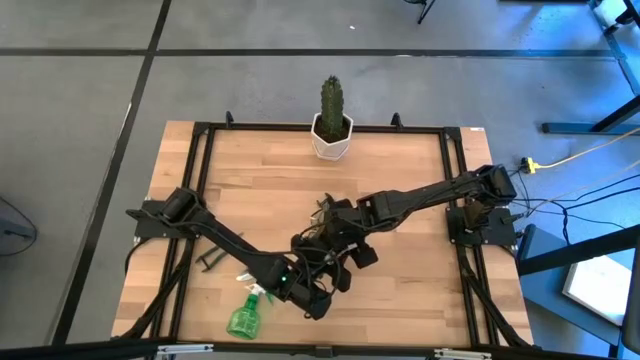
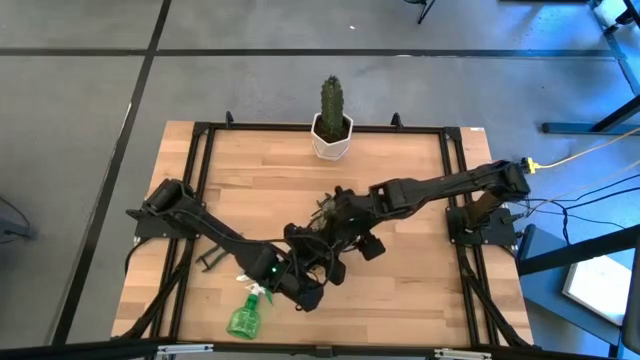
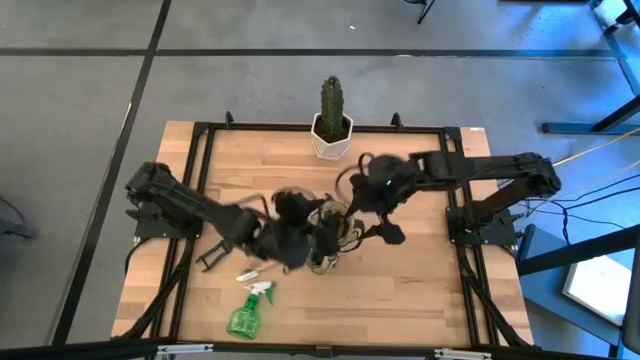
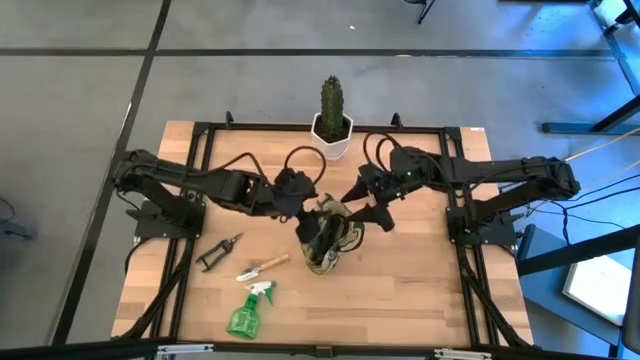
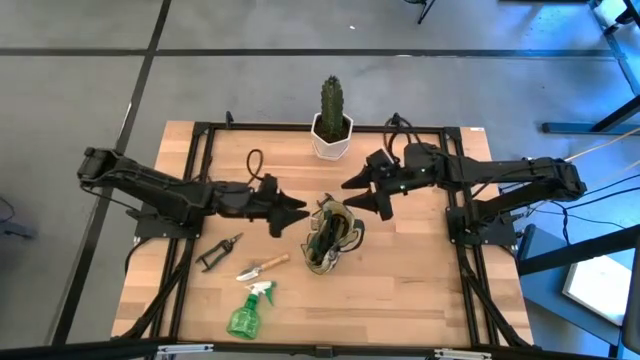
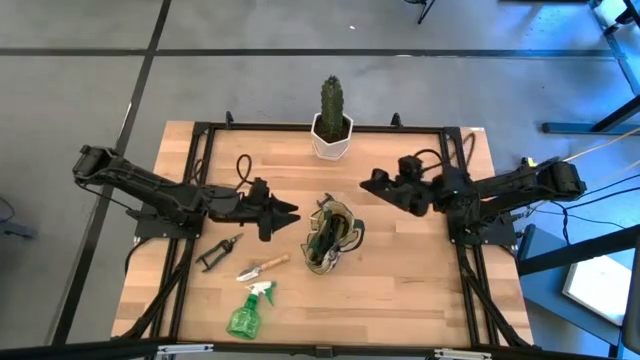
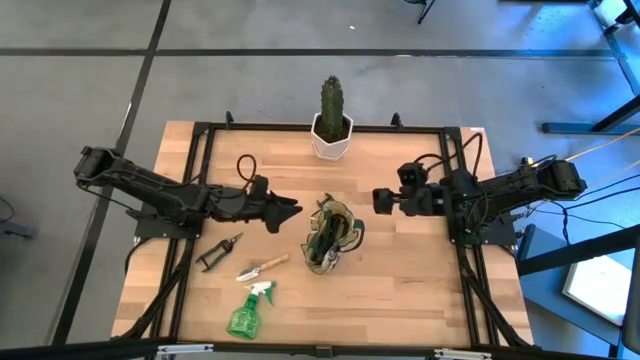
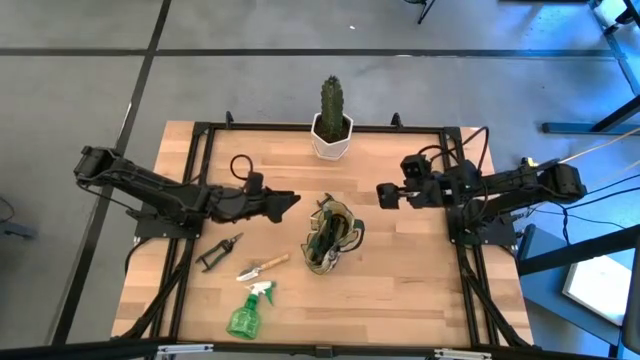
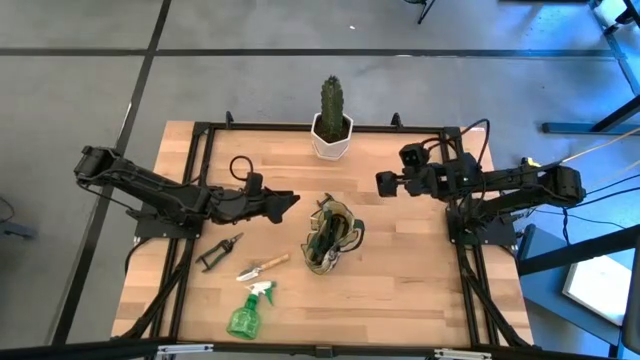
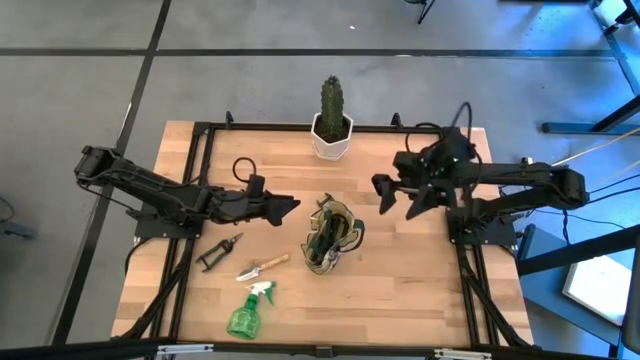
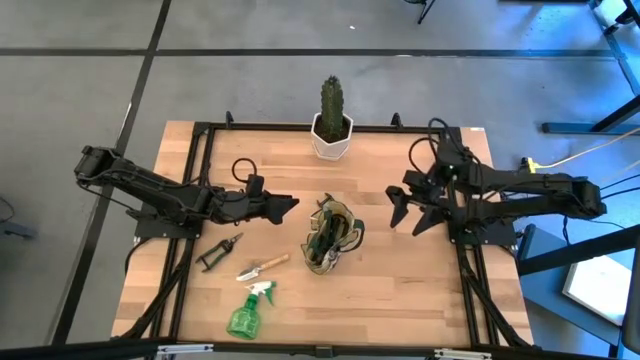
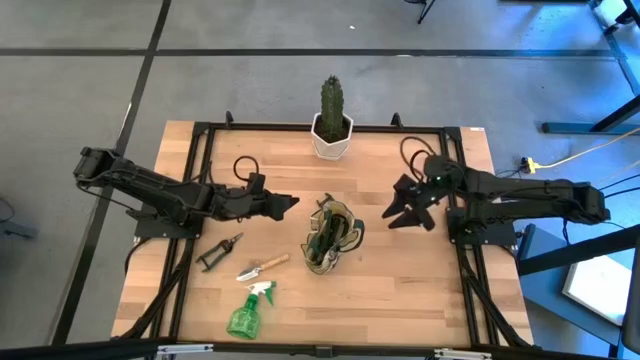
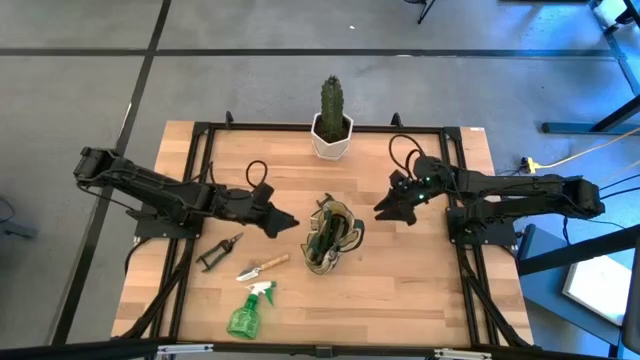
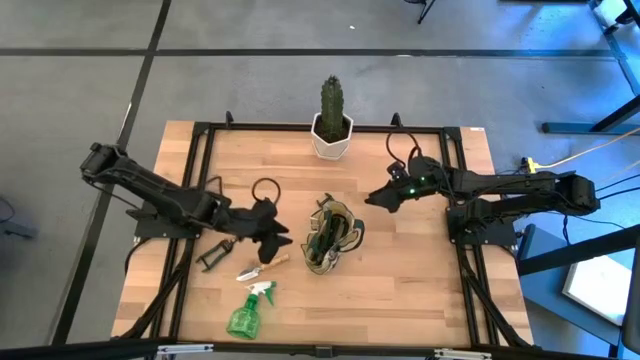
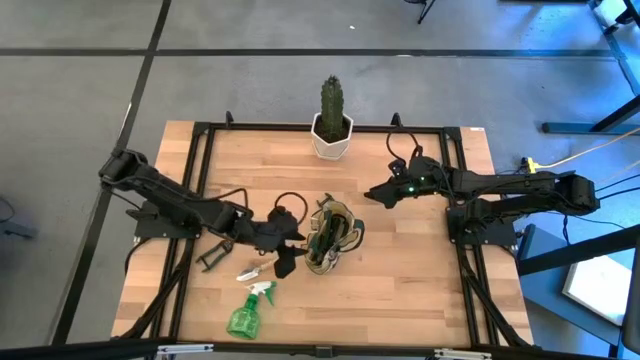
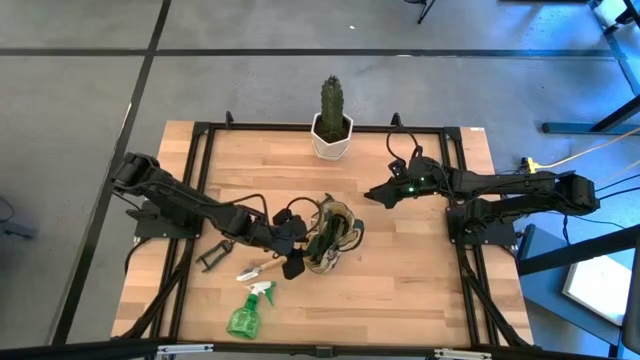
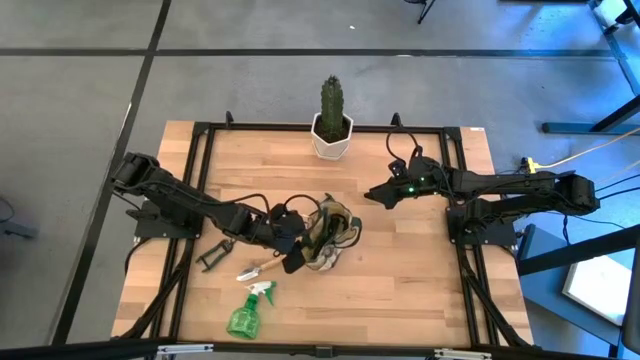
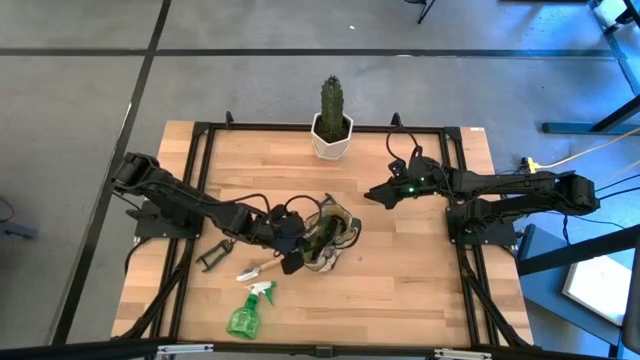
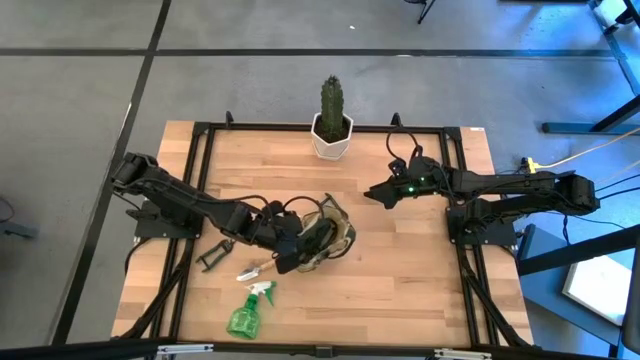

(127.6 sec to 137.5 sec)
Task: Pick & Place Garden tools in Gardening bag
Adjust the green gardening bag

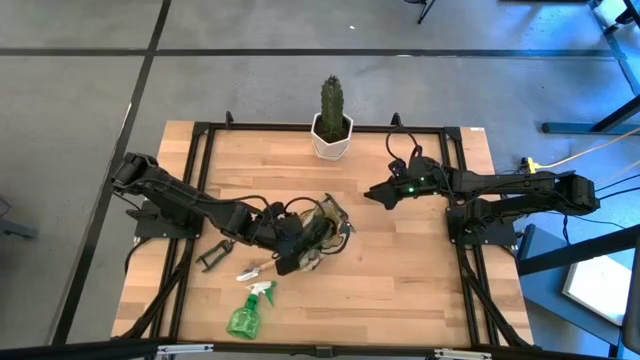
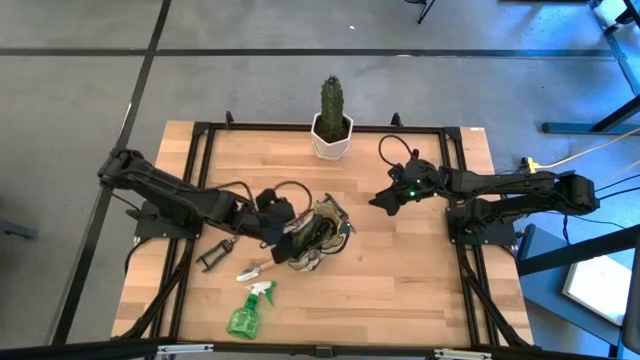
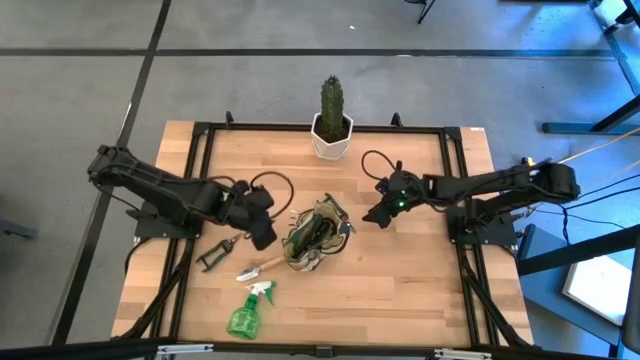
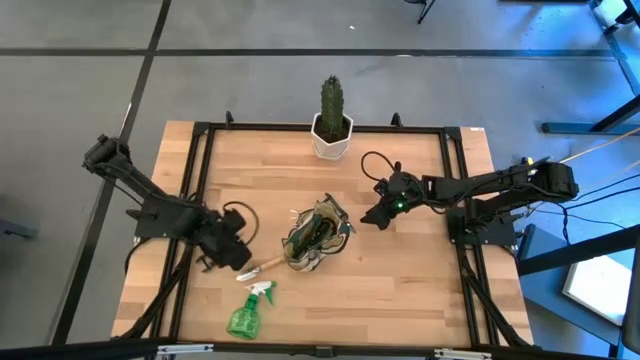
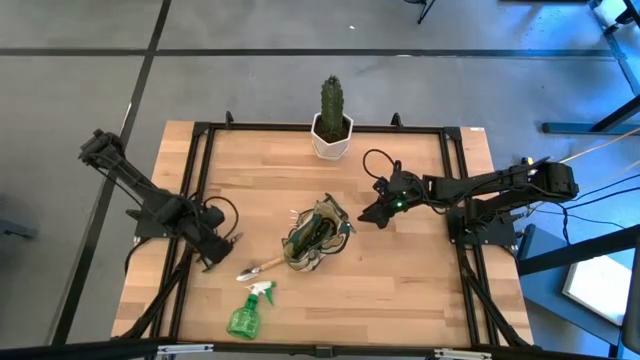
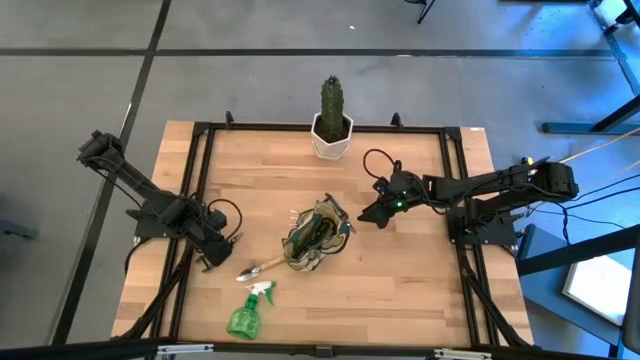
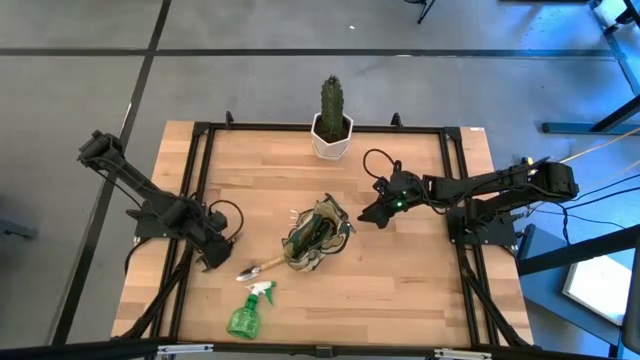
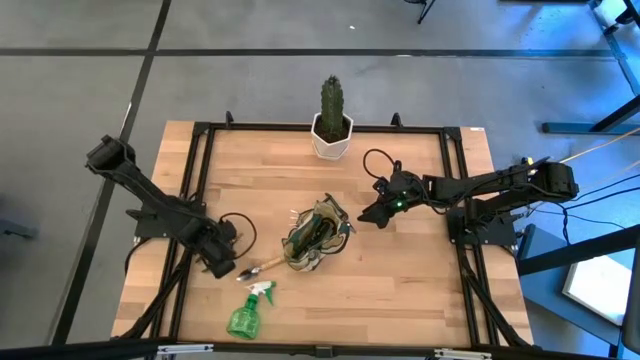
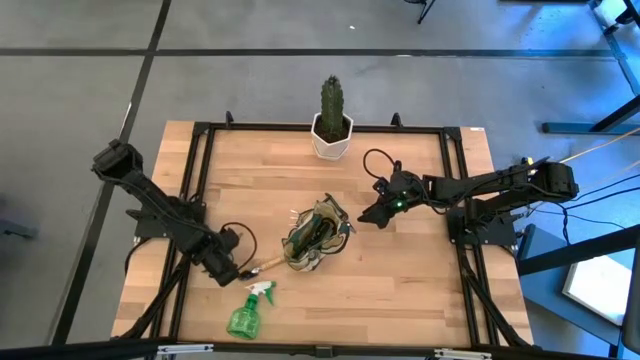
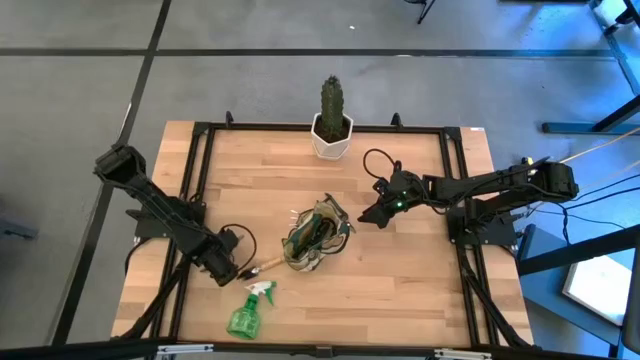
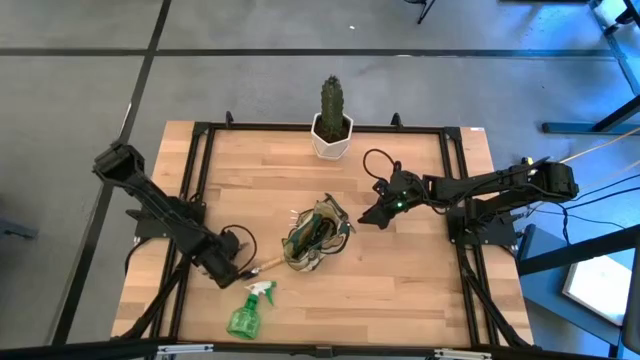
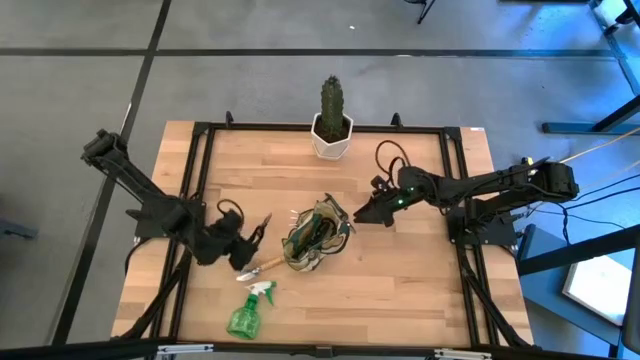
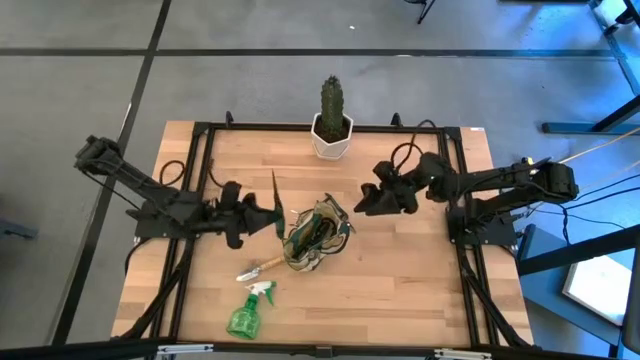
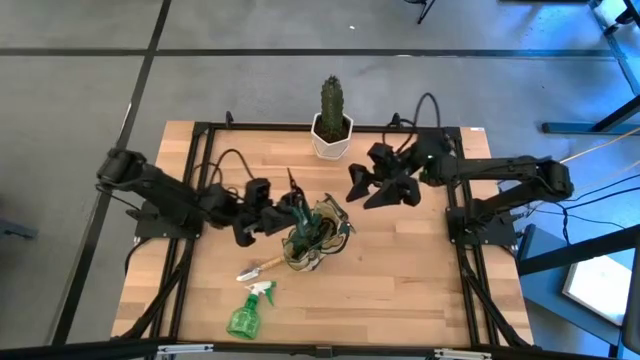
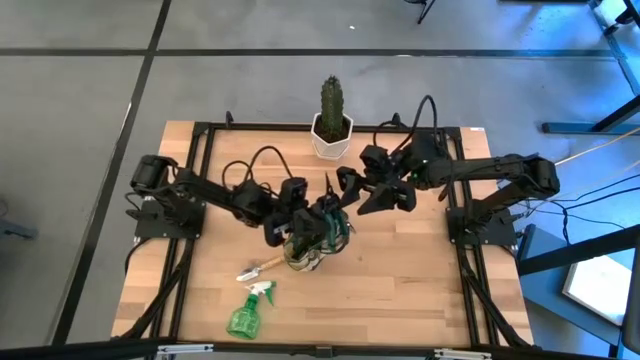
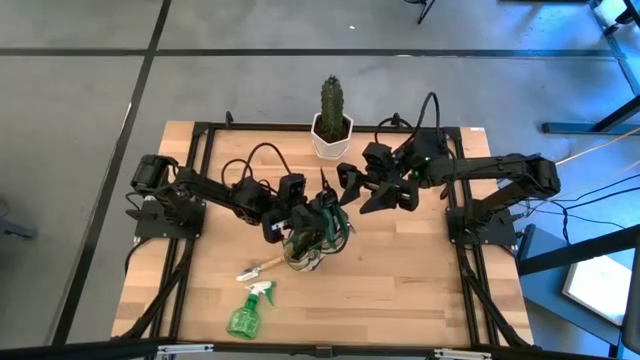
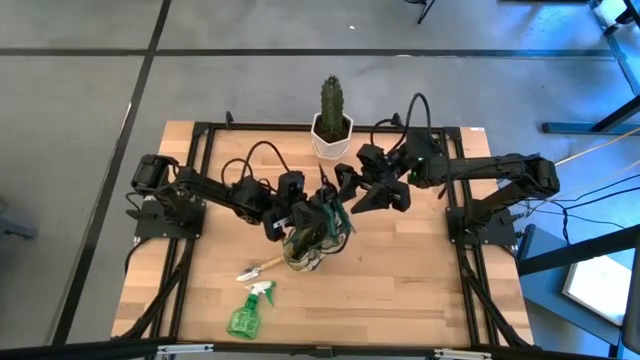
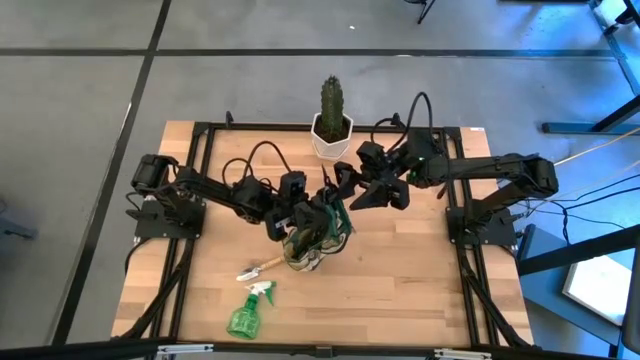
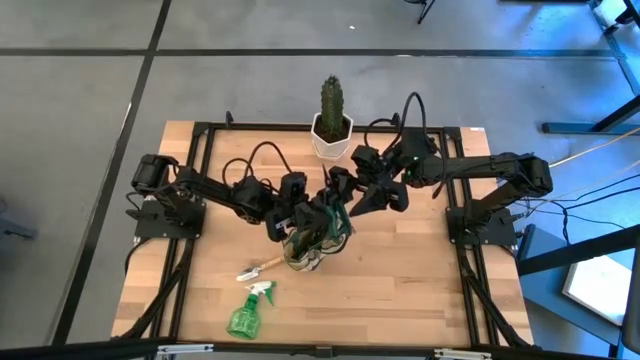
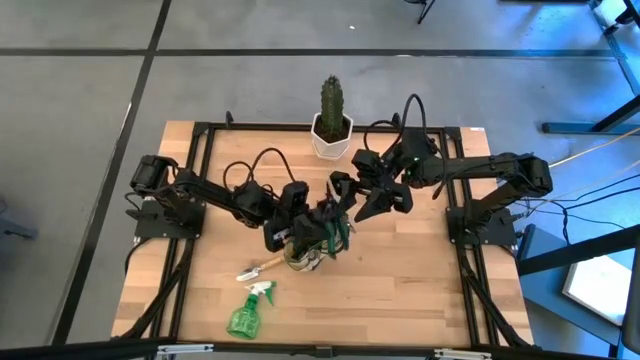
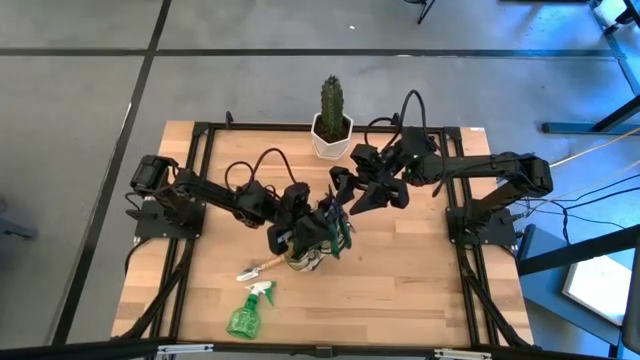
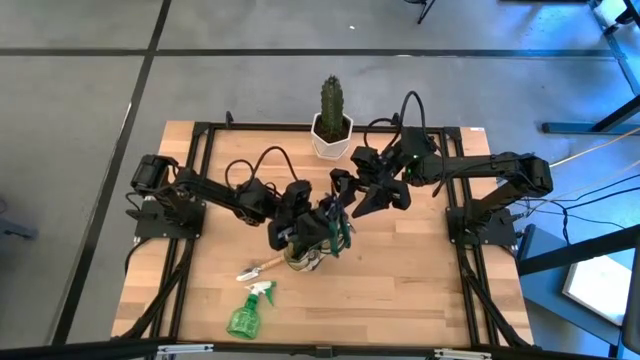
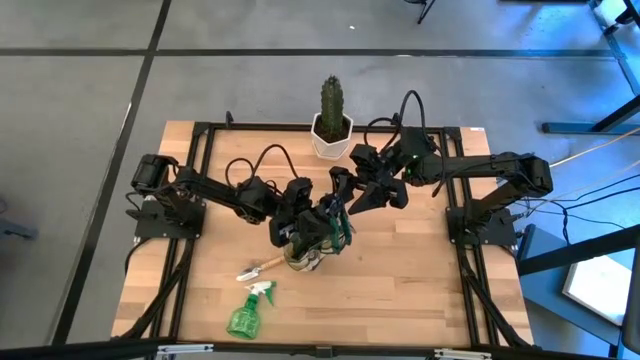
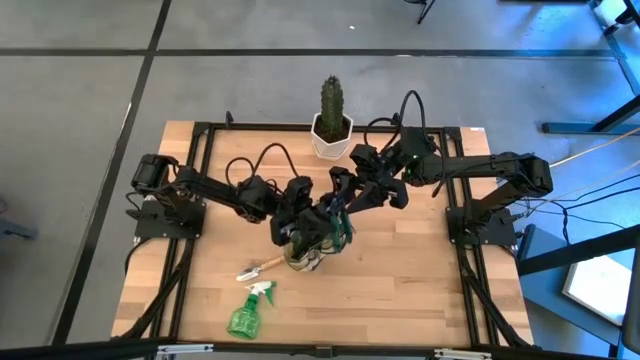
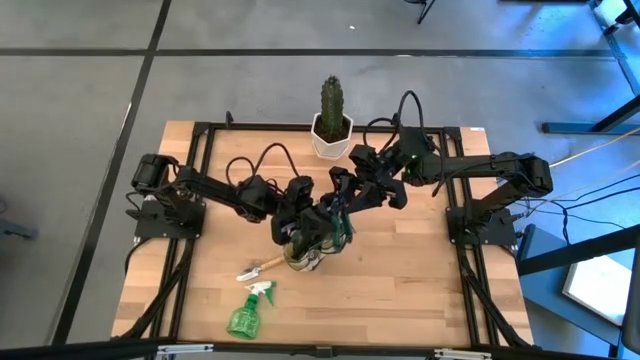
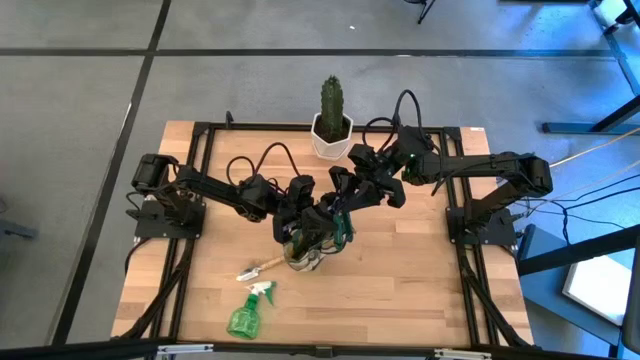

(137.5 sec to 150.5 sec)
Put the left green fruit pruner into the green gardening bag

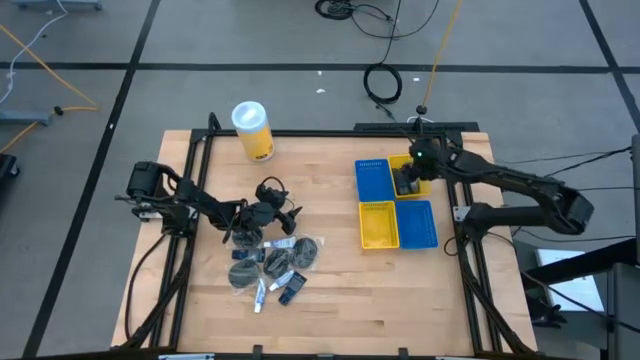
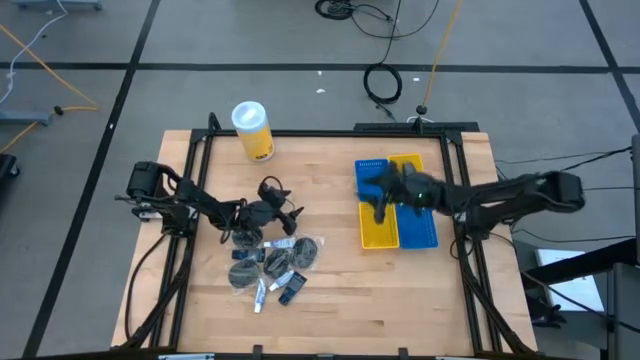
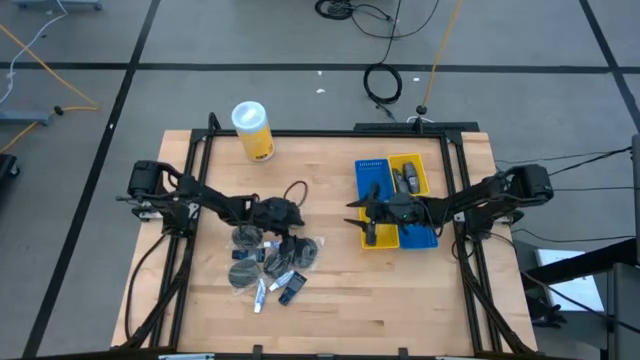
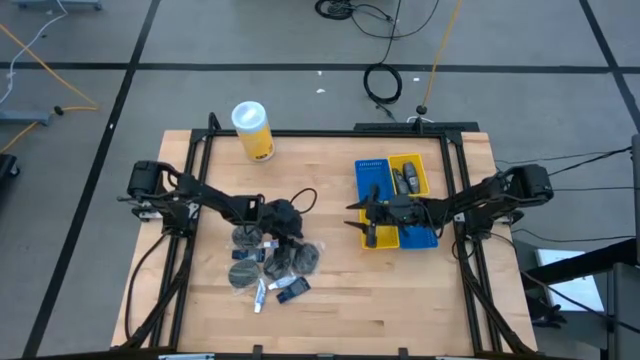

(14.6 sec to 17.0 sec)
Task: Pick & Place Travel size toiletries
Put the black hairbrush into the bottom blue bin
